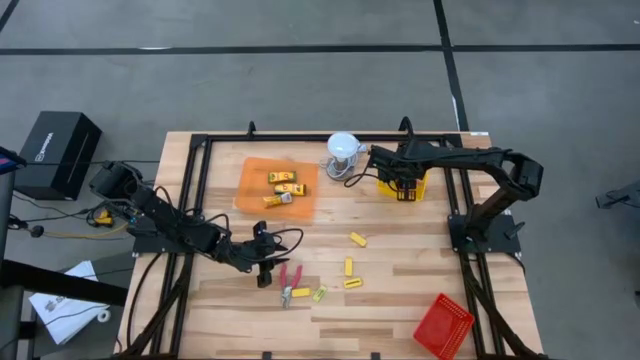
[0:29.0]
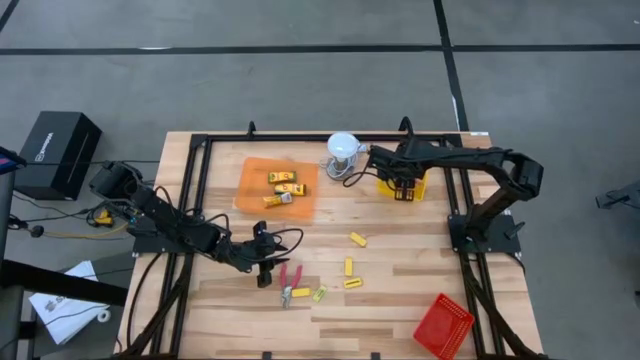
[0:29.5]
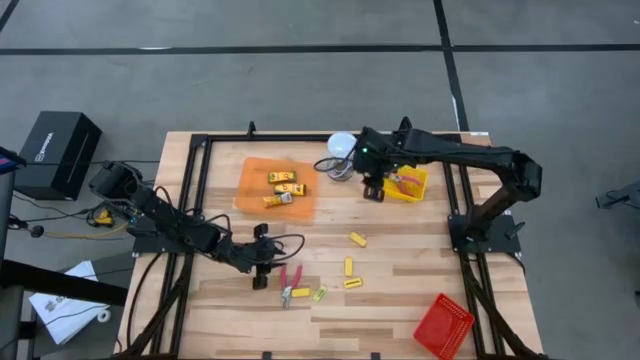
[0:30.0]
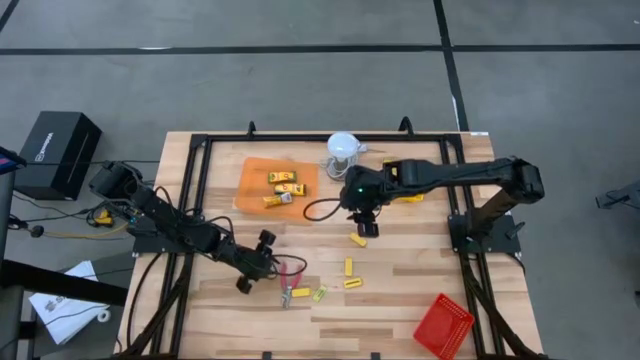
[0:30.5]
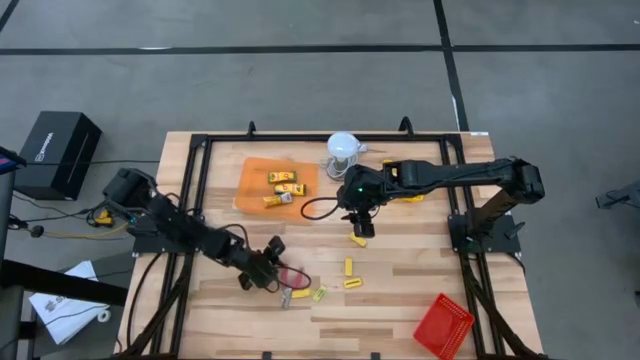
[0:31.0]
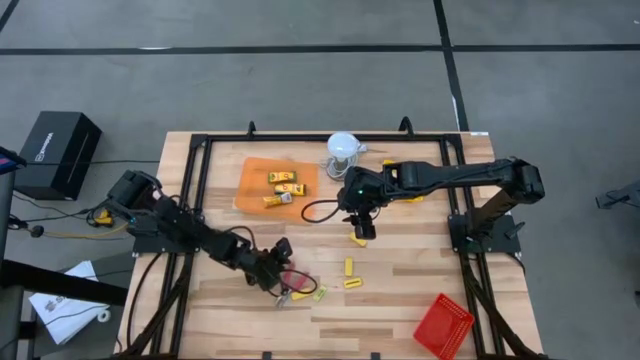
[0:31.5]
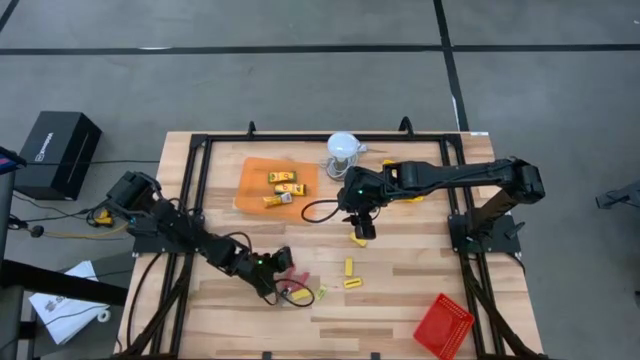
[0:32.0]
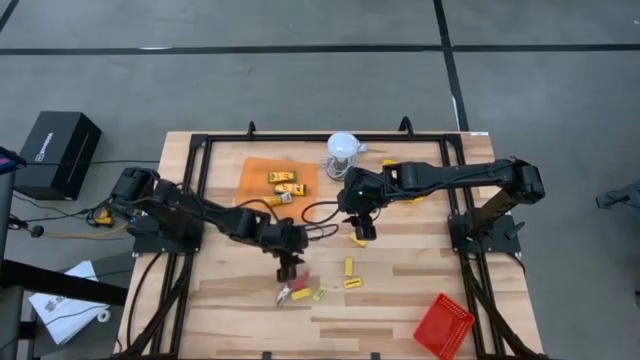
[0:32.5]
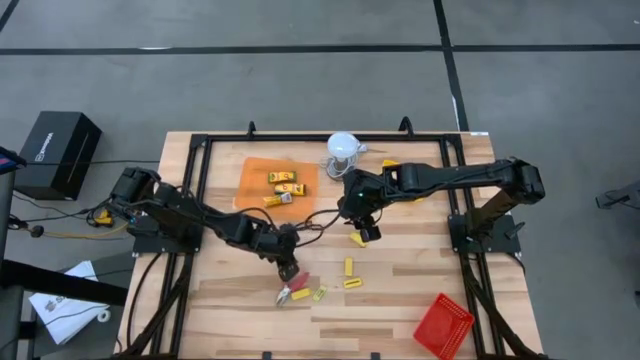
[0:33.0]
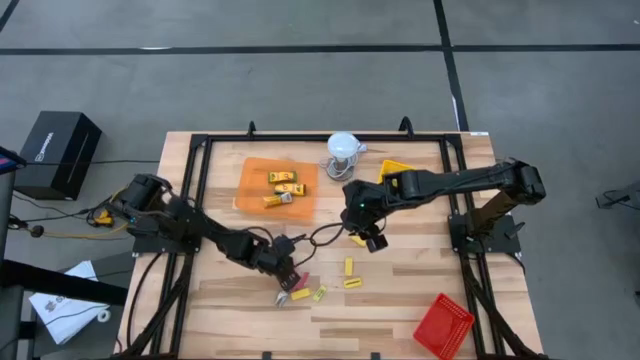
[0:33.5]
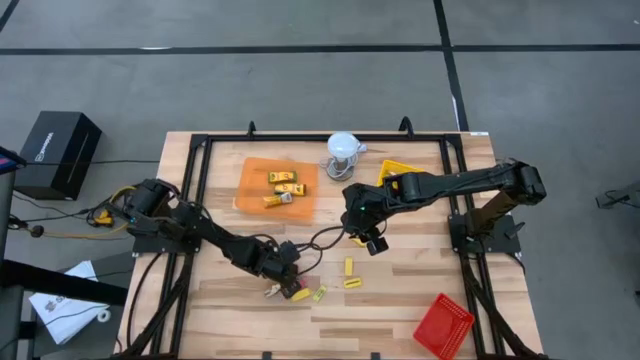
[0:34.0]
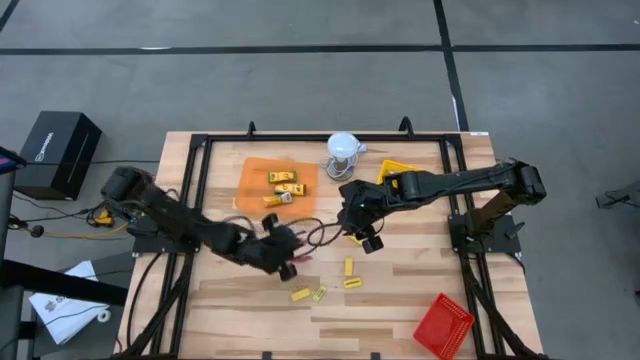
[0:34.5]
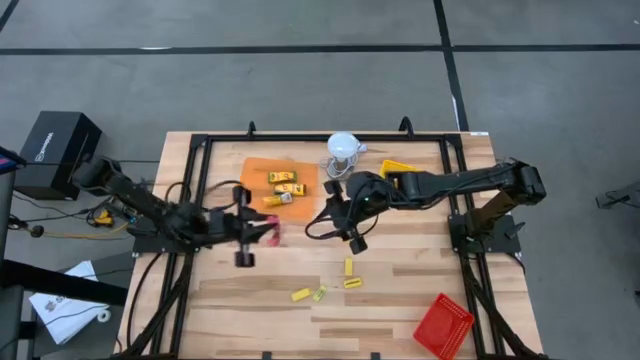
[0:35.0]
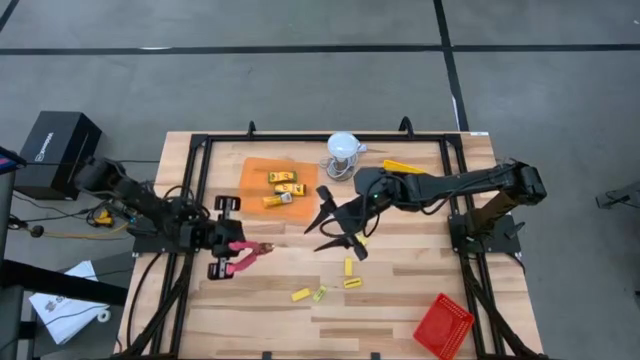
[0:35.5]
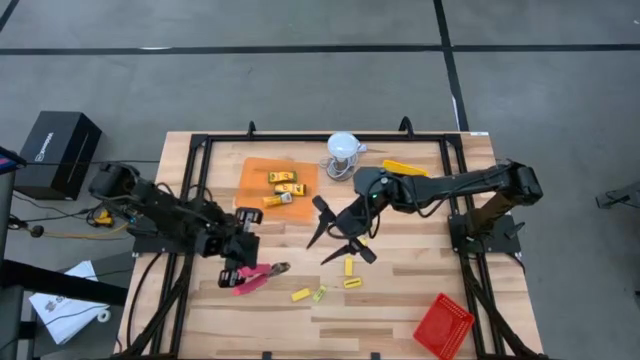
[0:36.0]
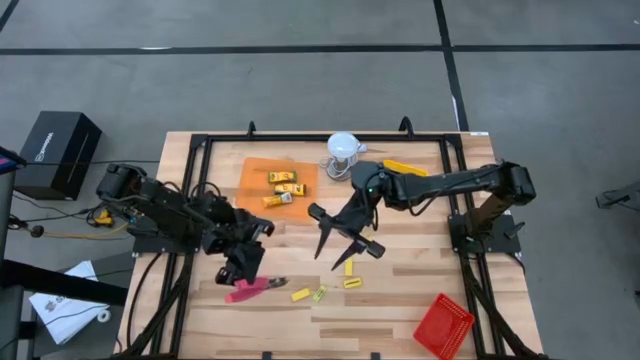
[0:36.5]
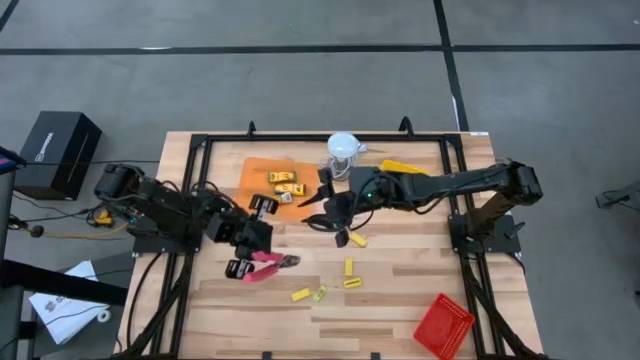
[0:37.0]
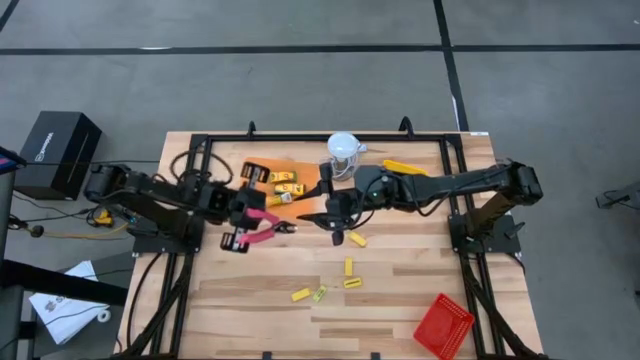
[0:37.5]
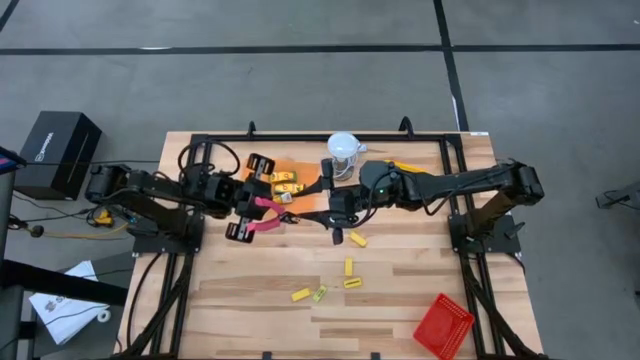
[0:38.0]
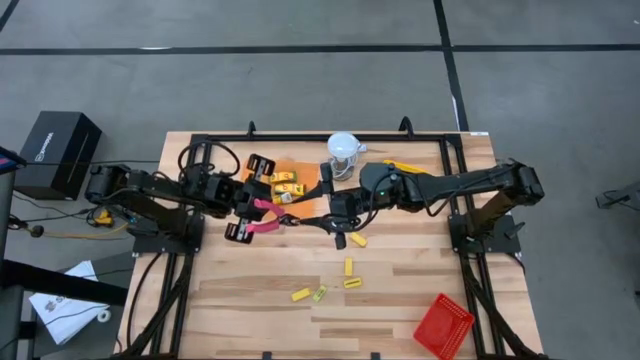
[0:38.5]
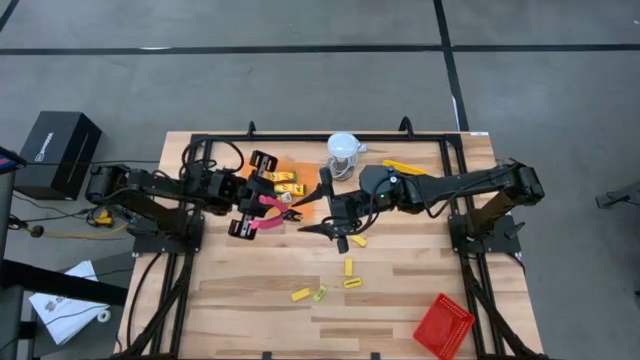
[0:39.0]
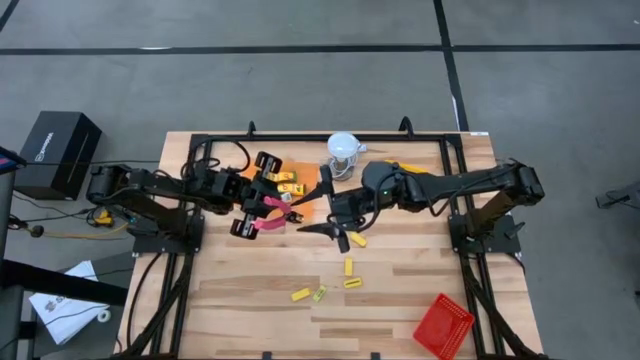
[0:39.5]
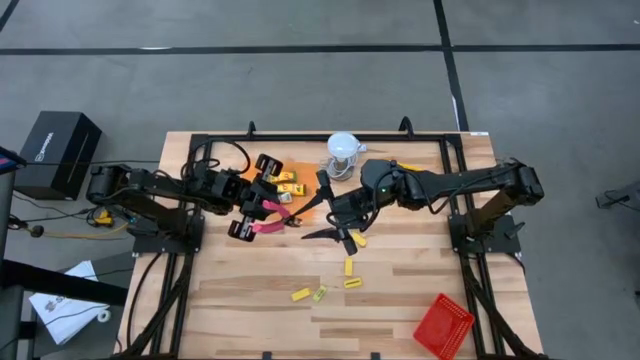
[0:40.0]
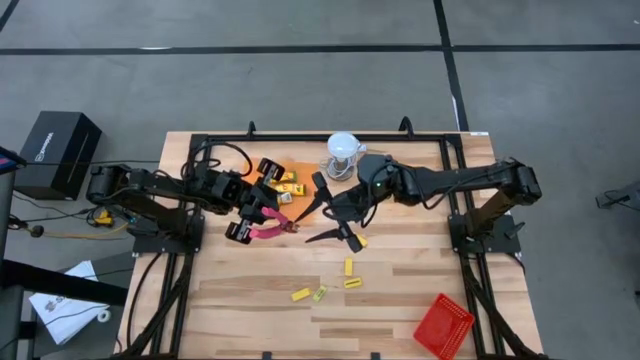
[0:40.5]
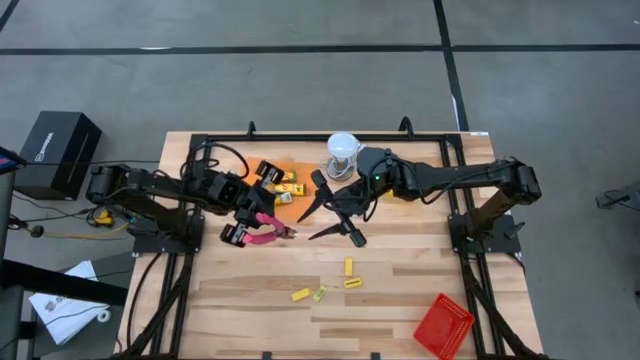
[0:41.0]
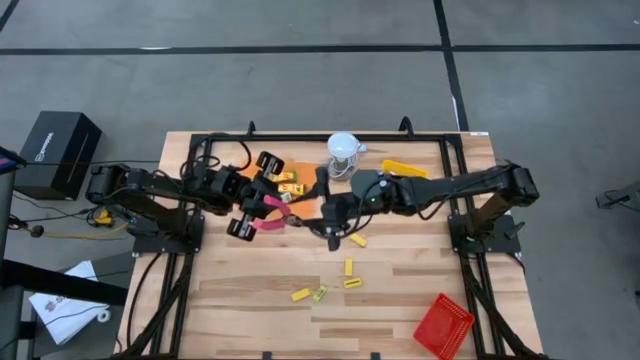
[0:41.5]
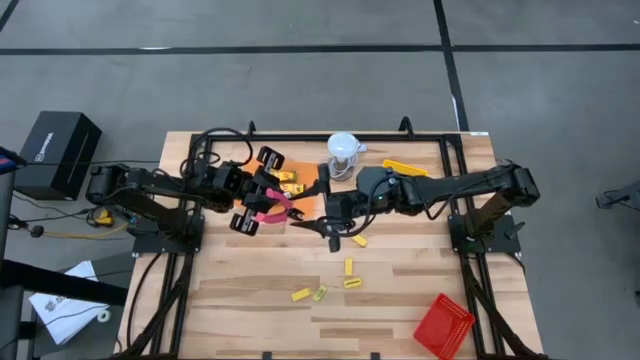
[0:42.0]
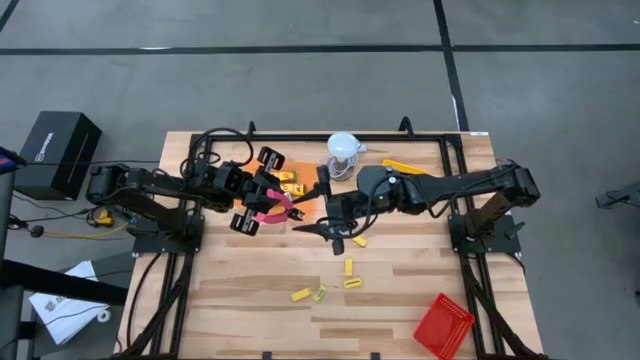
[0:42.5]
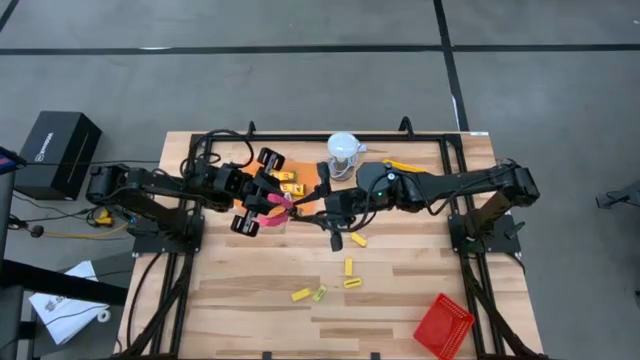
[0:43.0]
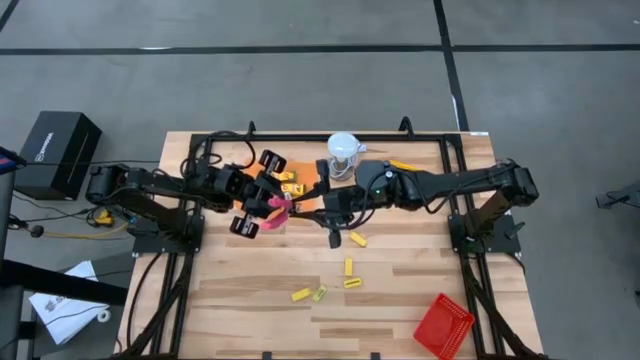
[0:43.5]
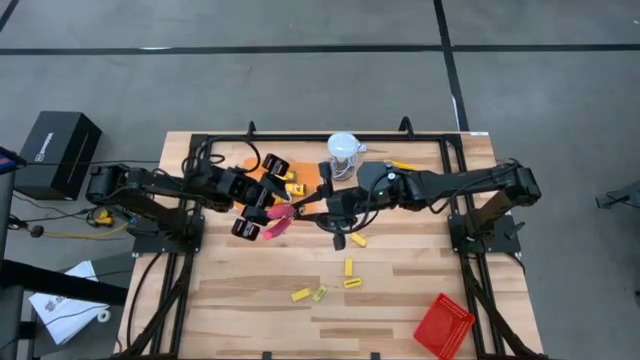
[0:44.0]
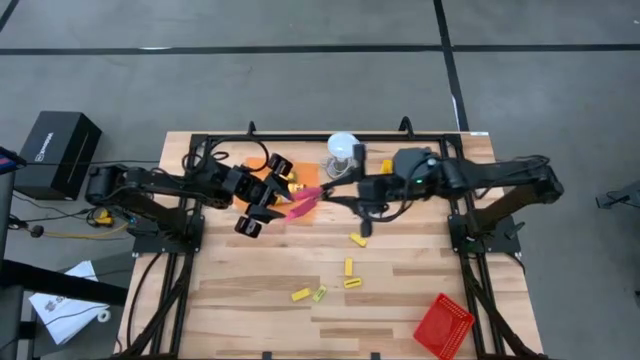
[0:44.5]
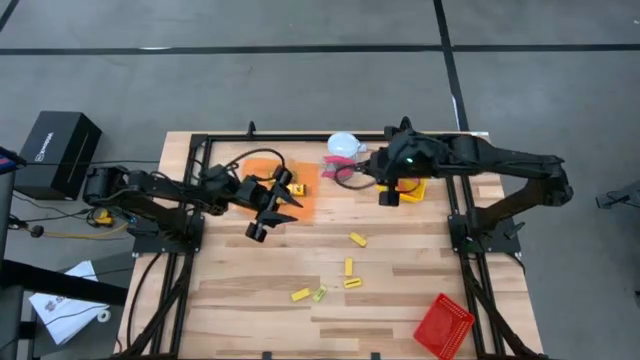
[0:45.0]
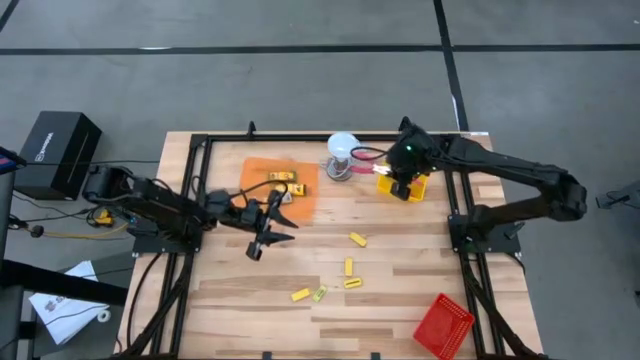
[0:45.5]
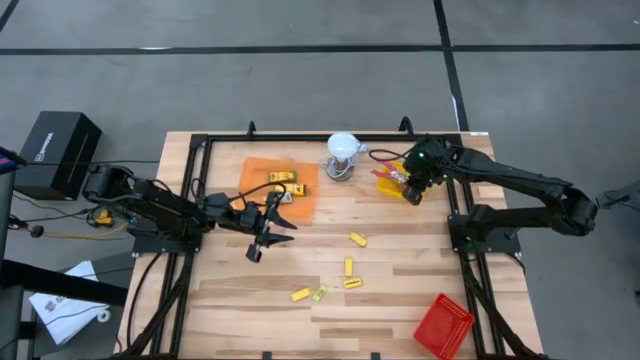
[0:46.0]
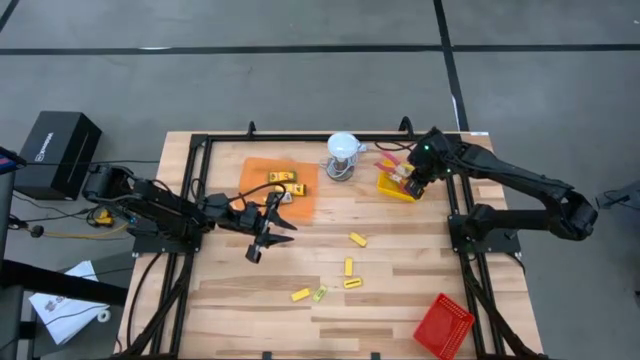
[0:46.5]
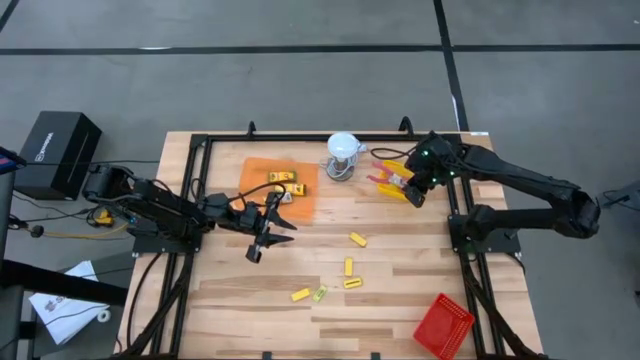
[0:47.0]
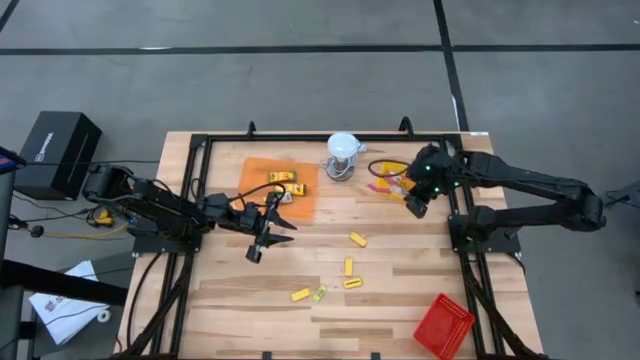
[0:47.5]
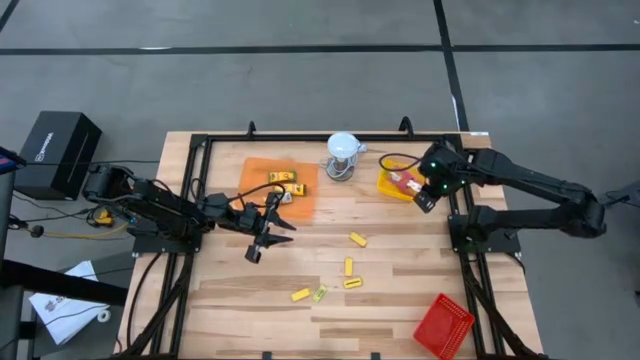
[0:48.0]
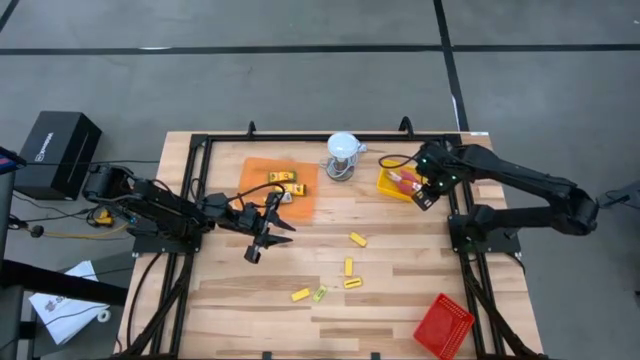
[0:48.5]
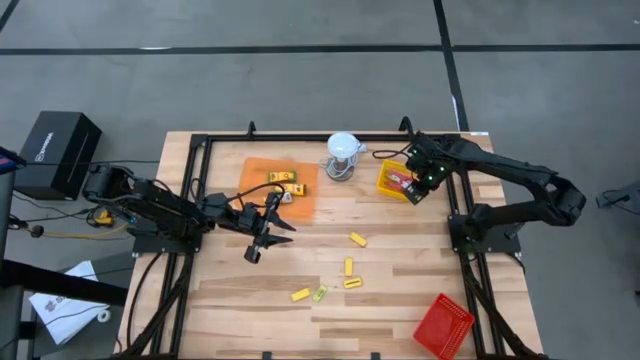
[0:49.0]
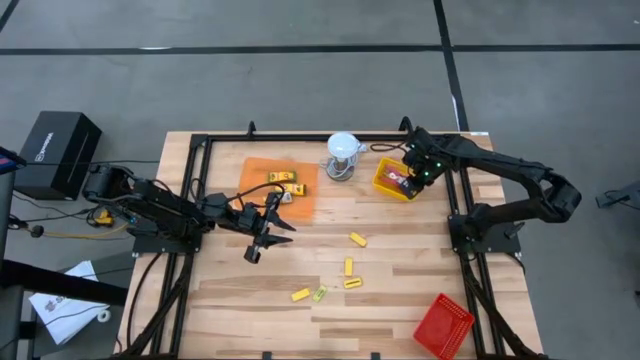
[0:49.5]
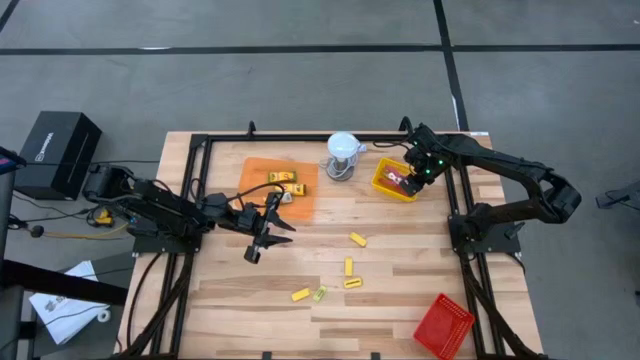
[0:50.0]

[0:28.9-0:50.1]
Task: Pick & Place School Supplies
Put the pink hole puncher into the yellow bin
